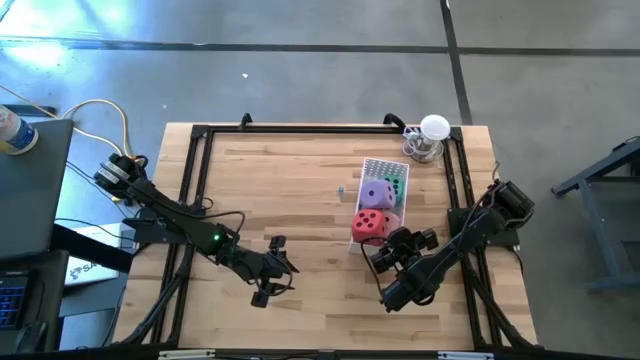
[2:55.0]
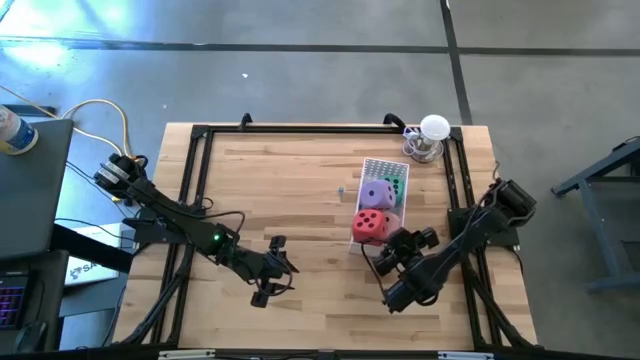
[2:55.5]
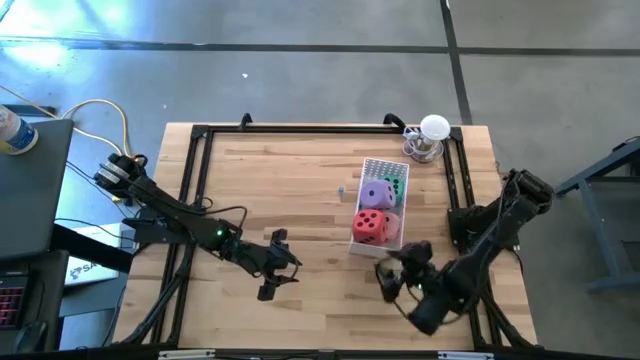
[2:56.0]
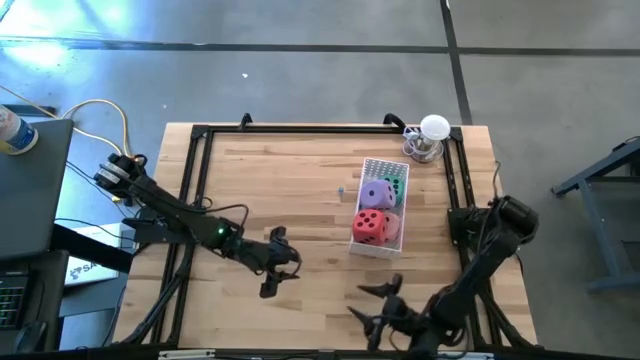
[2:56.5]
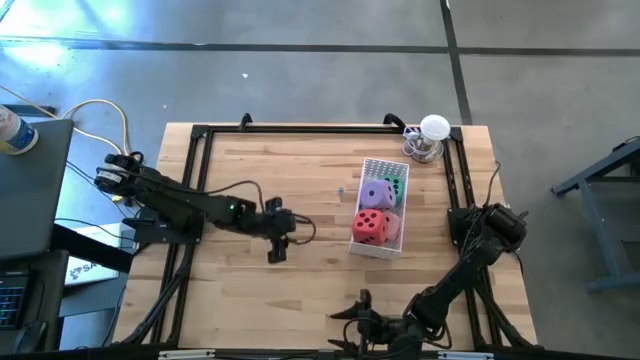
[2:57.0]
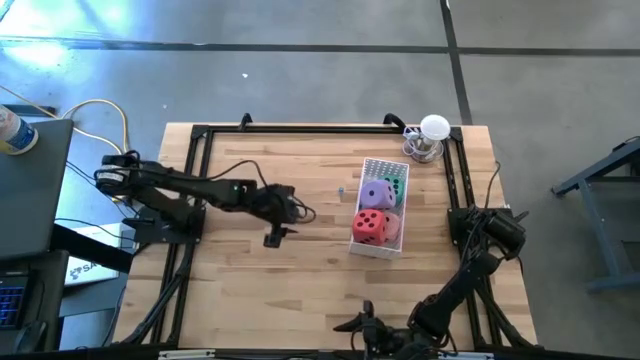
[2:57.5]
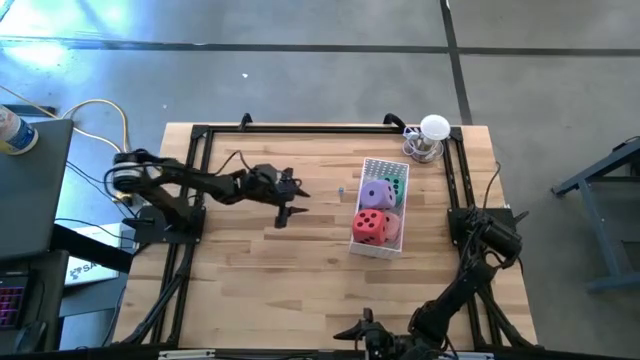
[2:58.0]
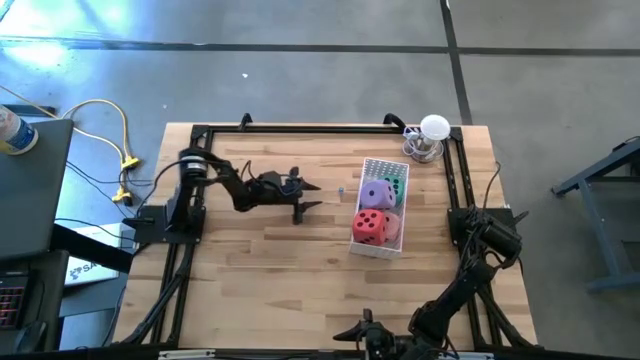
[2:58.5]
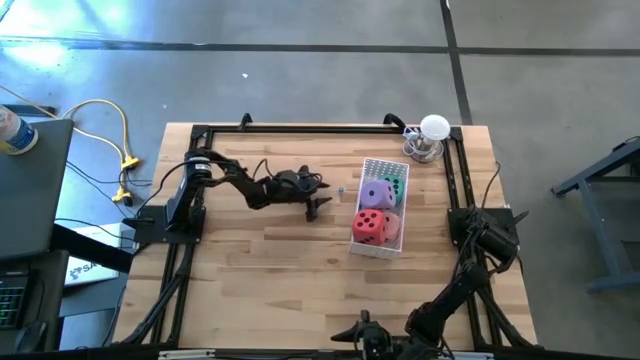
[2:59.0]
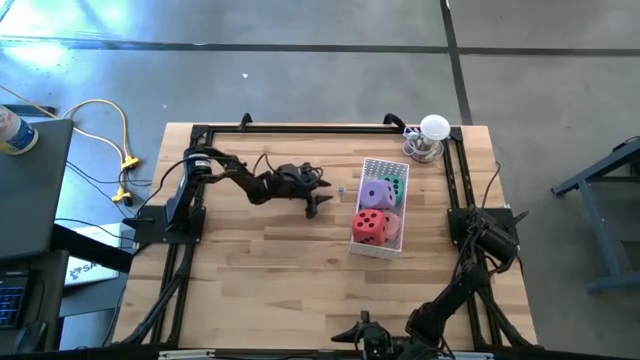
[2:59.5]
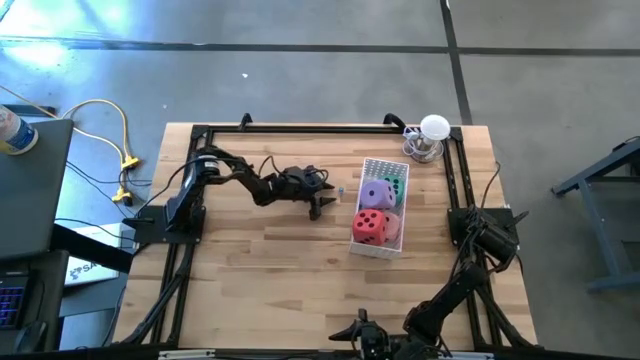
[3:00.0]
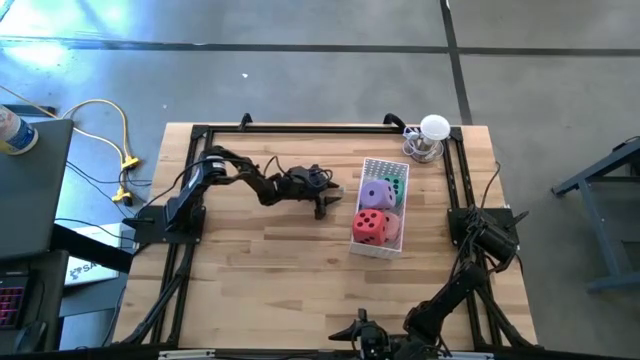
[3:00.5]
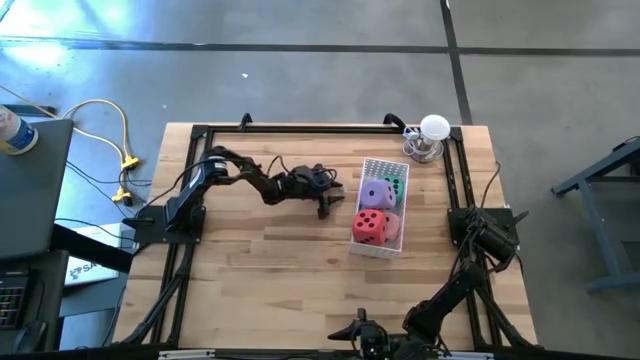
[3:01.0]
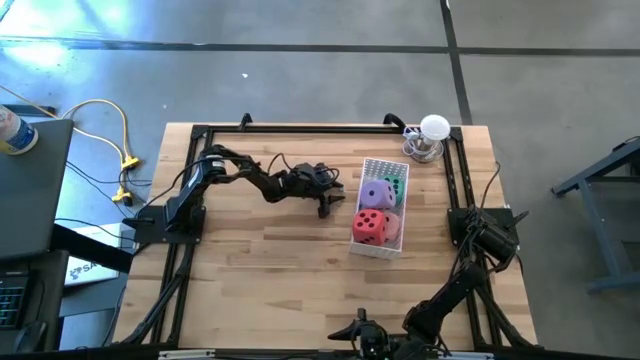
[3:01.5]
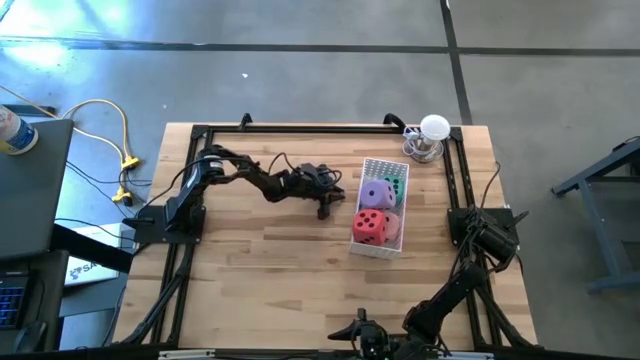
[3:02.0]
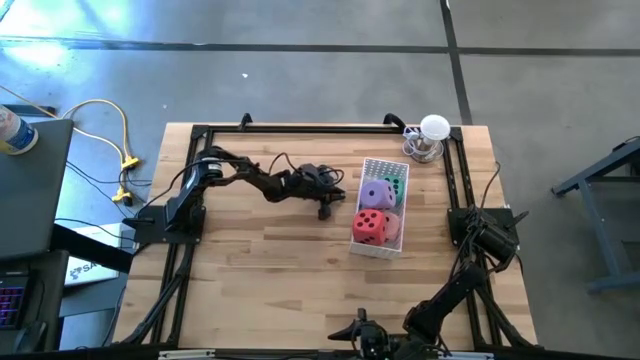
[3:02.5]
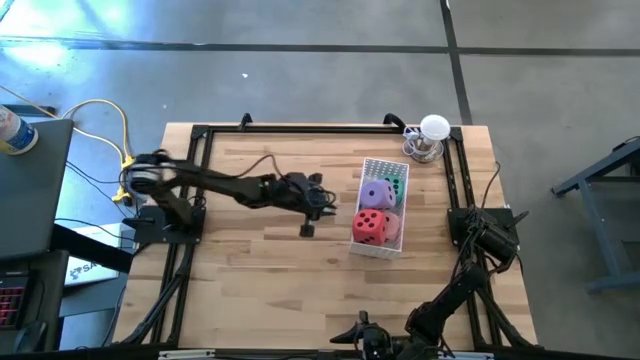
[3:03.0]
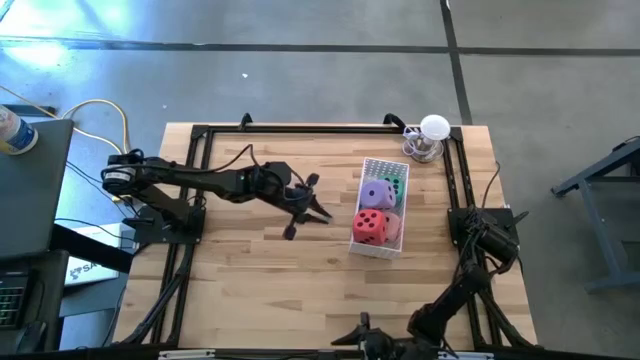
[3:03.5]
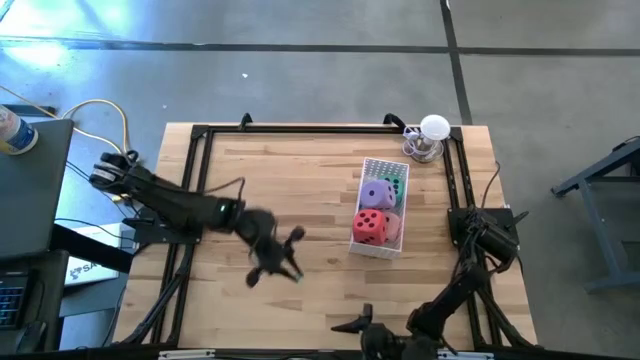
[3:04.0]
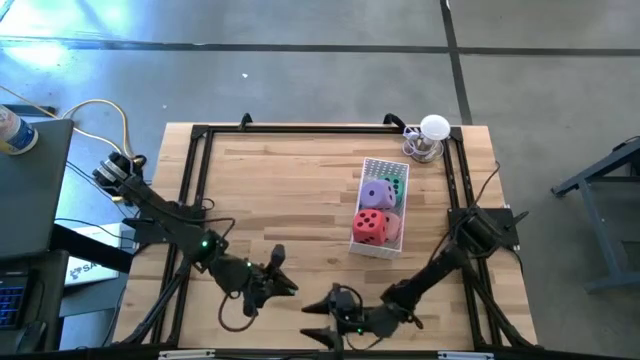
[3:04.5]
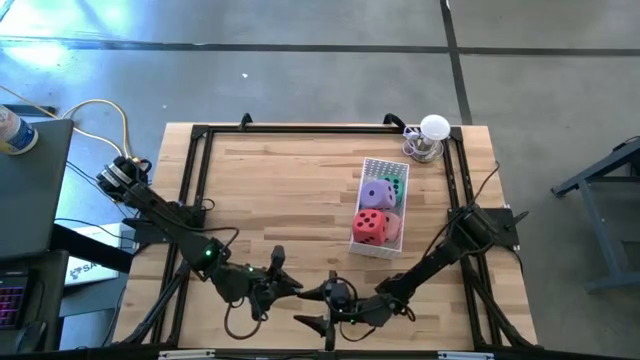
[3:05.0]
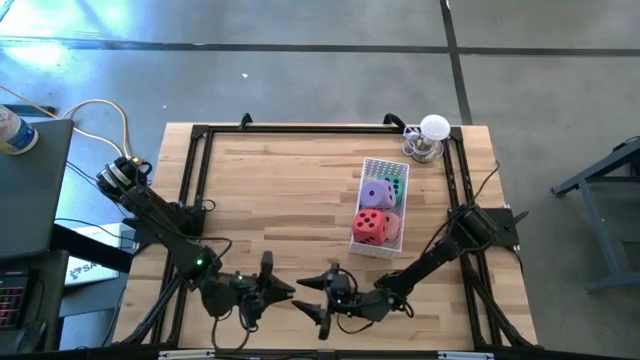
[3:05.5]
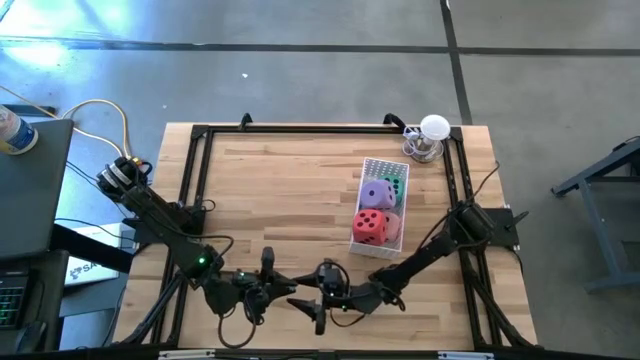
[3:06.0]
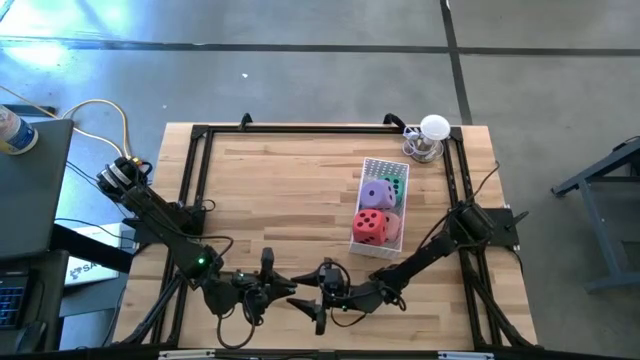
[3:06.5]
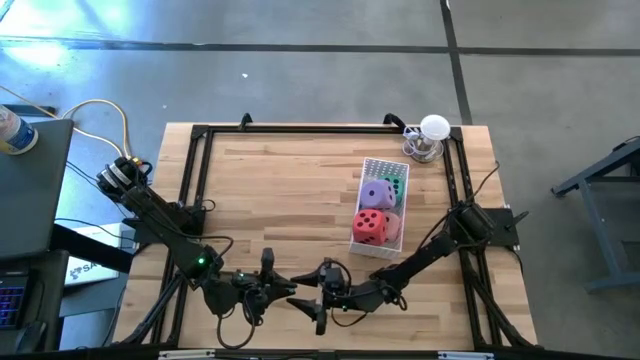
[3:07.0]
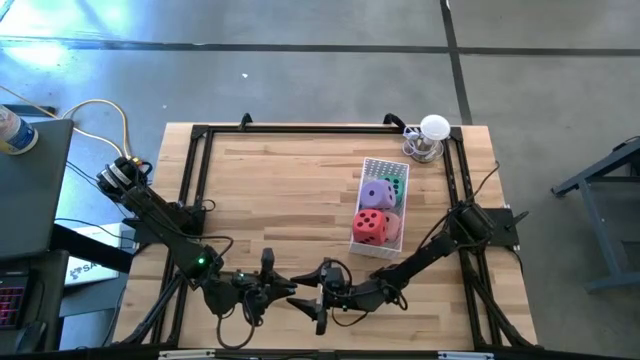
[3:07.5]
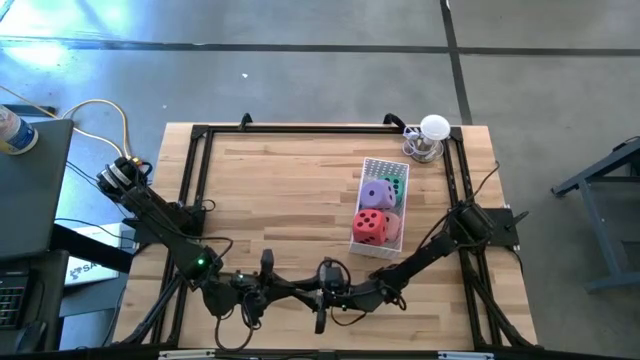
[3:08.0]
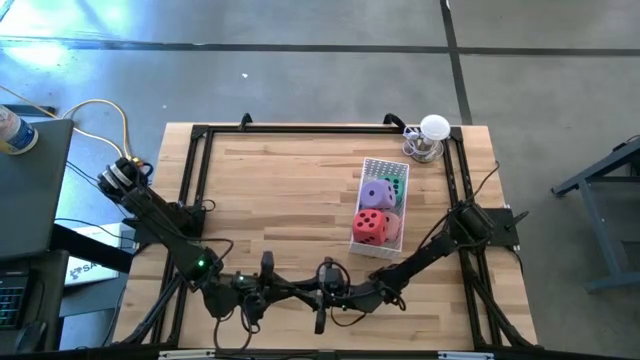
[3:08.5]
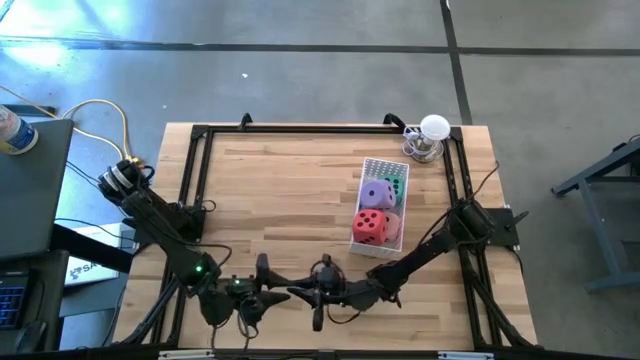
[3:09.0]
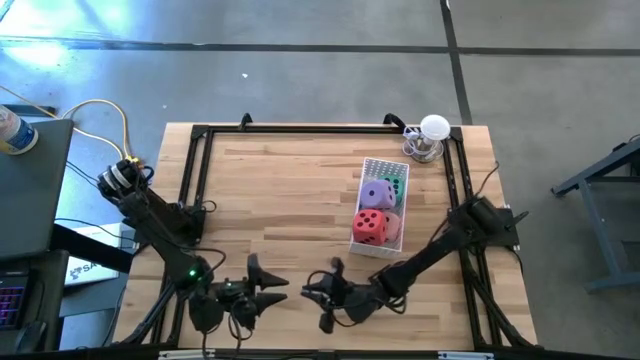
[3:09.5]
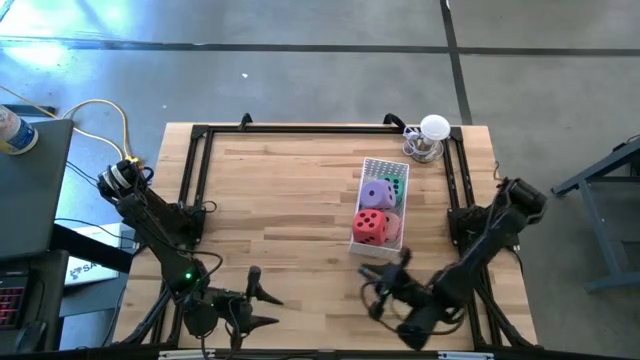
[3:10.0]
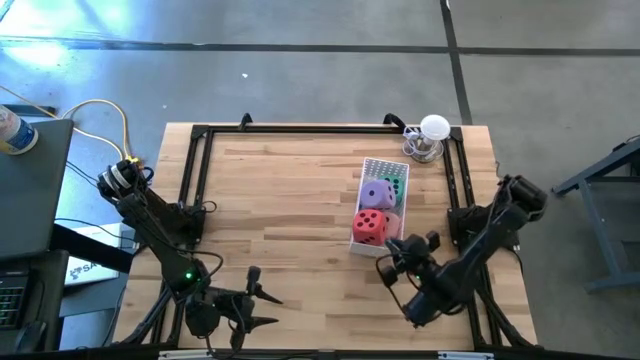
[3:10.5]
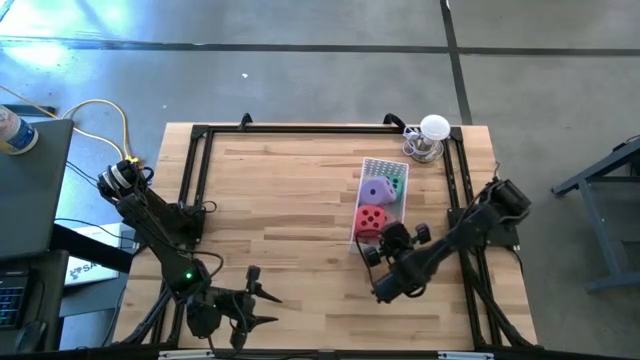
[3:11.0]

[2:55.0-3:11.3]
Task: Pick & Place Dice
Put the light blue die into the white bin

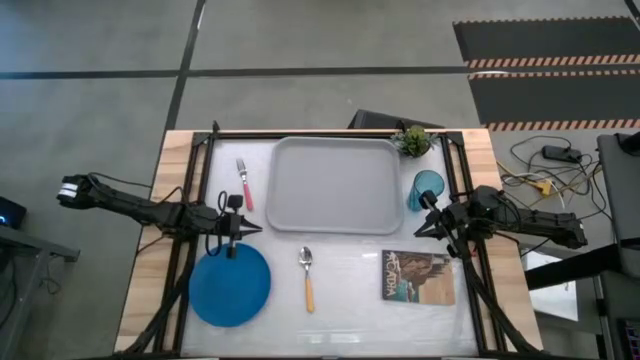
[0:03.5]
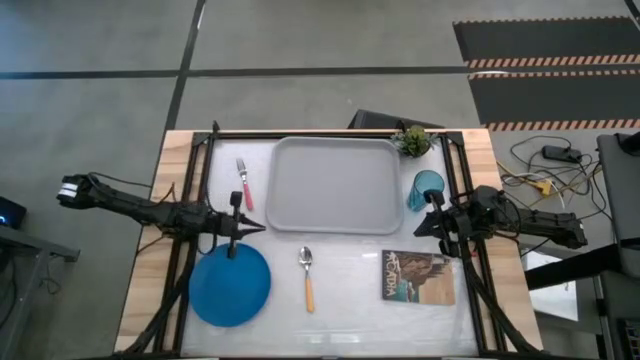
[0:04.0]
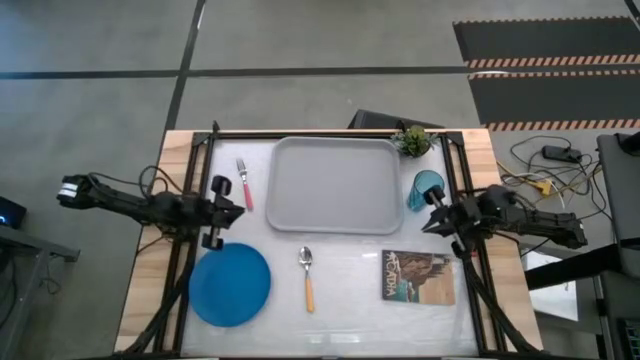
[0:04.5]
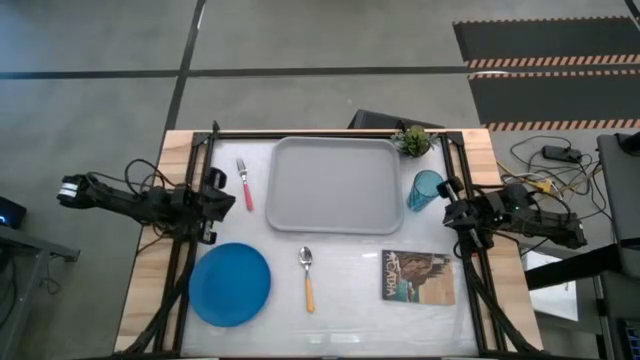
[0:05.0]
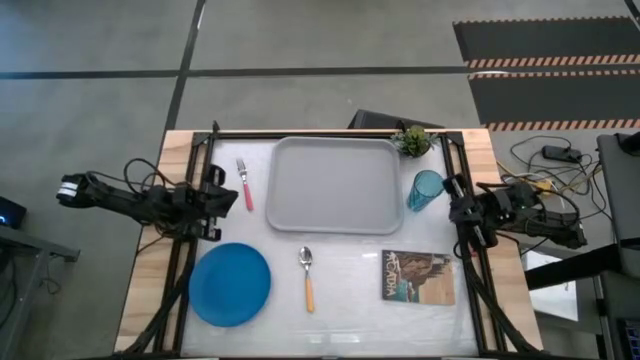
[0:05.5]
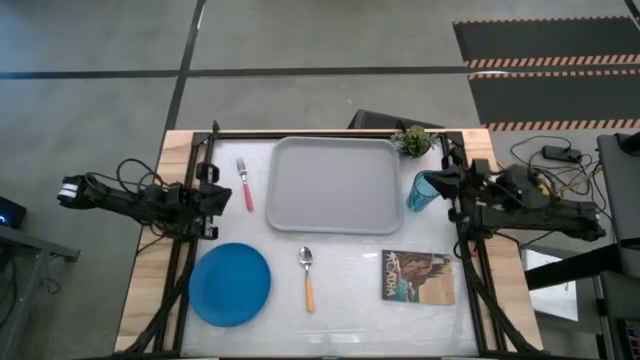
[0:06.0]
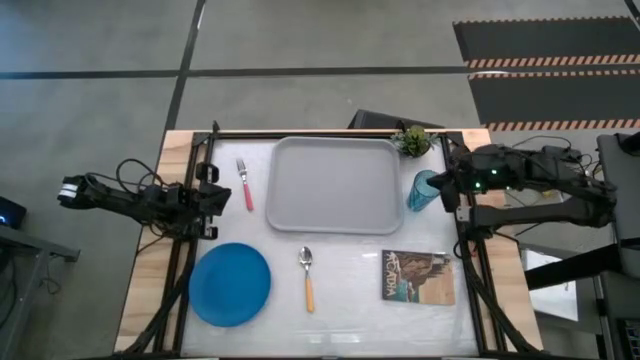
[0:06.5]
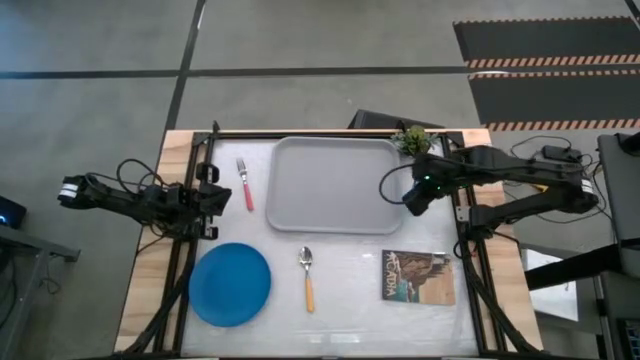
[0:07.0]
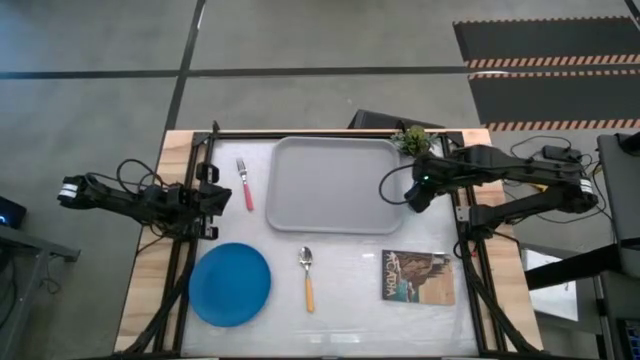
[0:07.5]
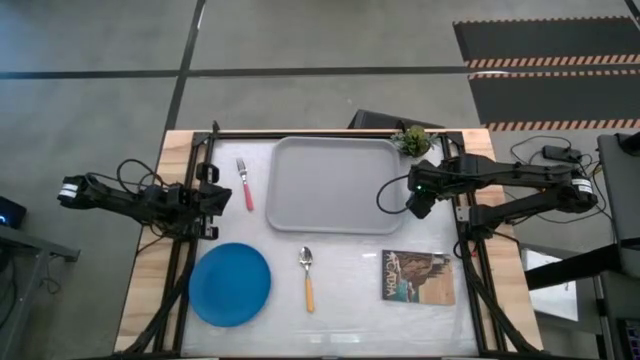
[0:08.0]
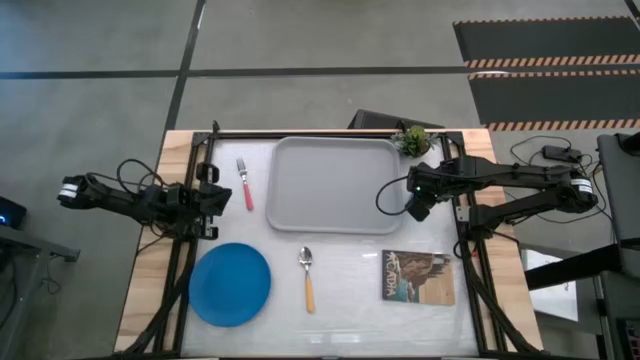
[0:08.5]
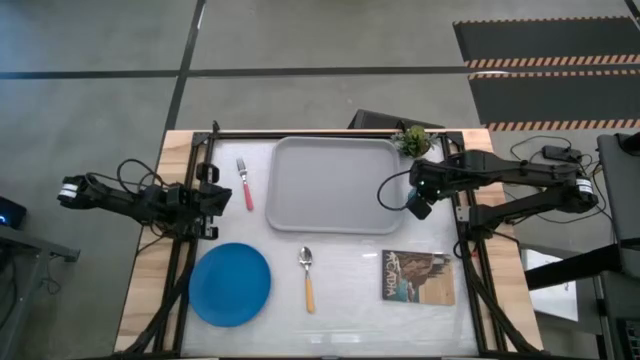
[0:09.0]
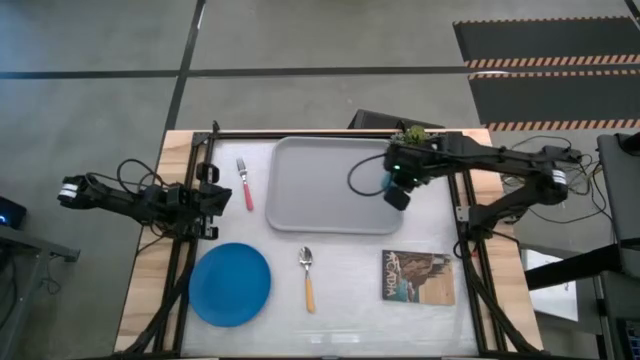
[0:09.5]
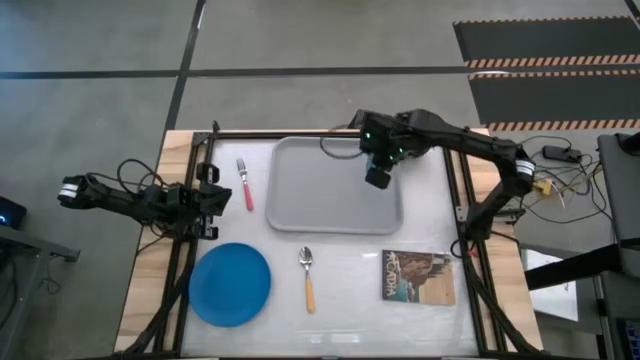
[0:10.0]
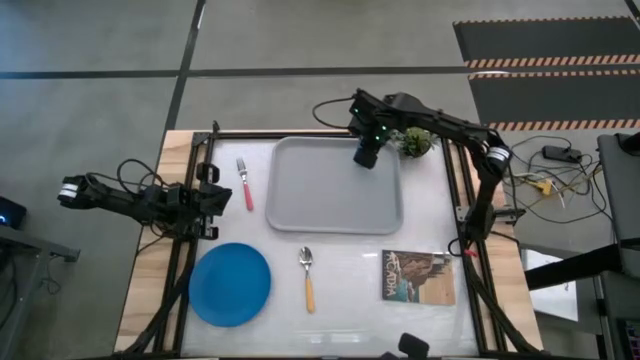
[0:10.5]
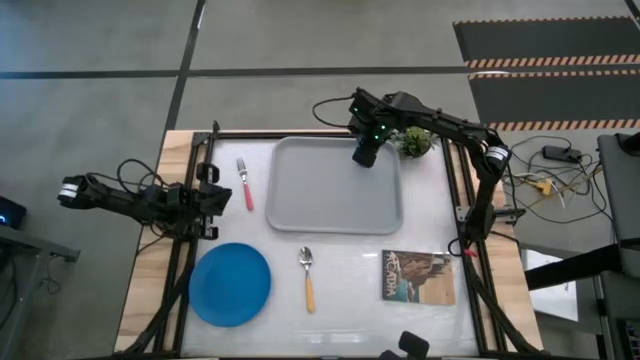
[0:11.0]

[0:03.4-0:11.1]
Task: Pick and place plate/cup/fork/spoon on tray
Put the blue glass to the top right corner of the tray
